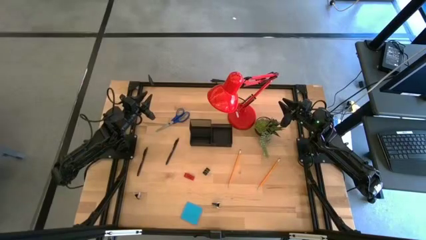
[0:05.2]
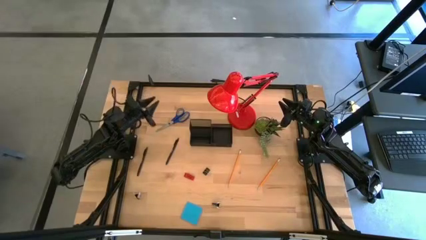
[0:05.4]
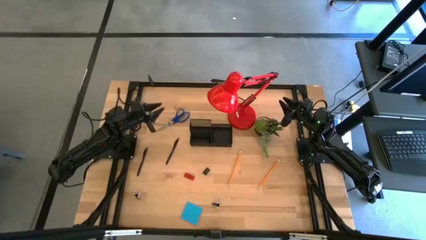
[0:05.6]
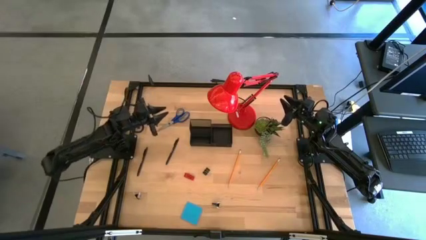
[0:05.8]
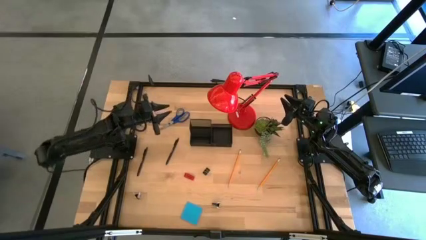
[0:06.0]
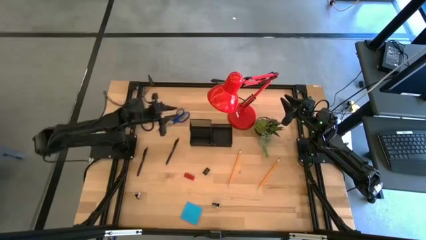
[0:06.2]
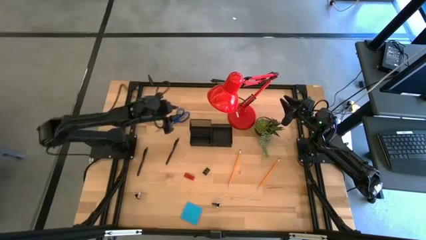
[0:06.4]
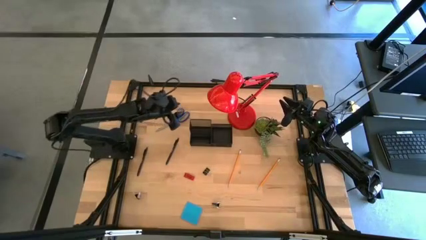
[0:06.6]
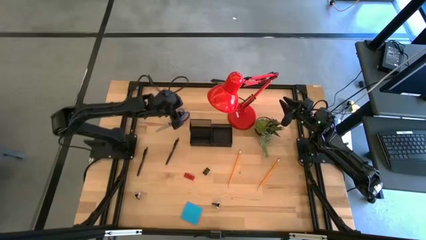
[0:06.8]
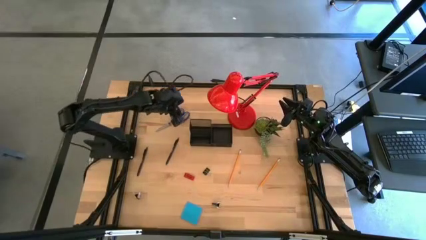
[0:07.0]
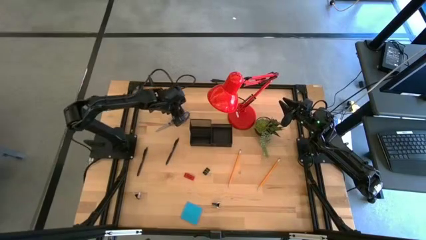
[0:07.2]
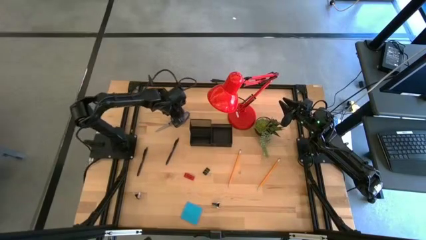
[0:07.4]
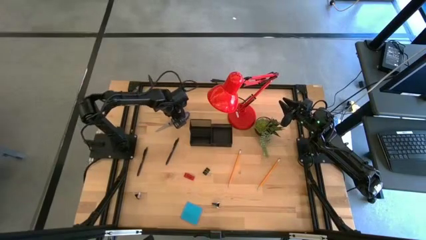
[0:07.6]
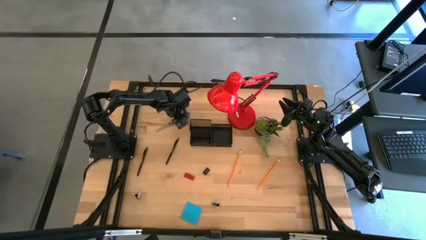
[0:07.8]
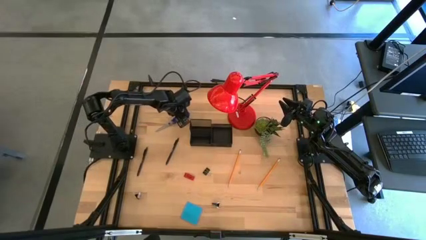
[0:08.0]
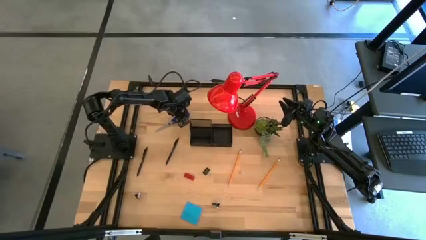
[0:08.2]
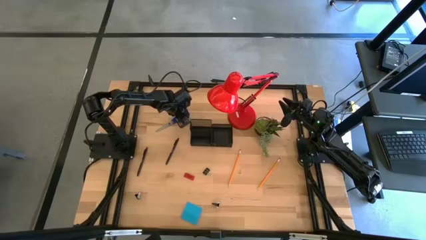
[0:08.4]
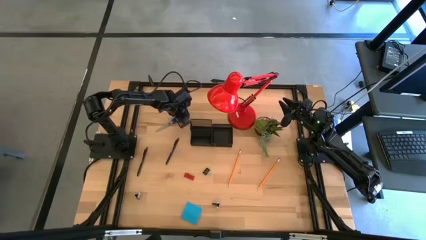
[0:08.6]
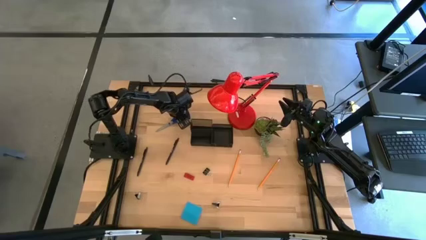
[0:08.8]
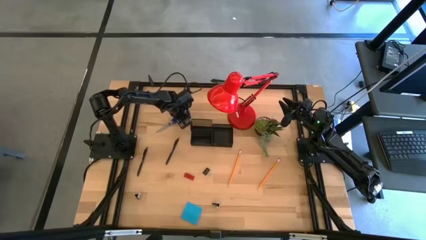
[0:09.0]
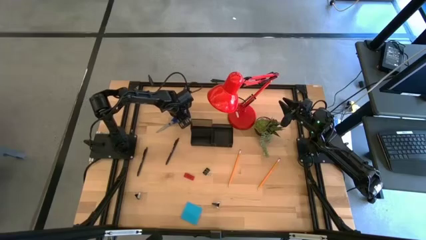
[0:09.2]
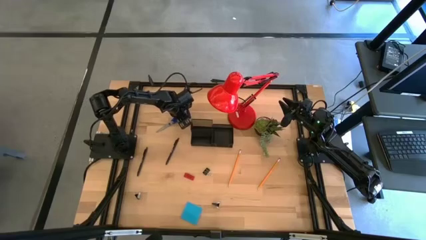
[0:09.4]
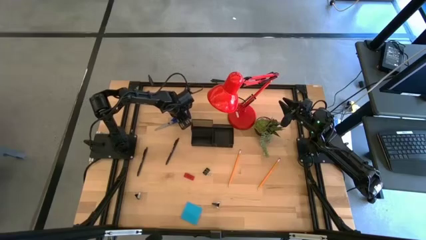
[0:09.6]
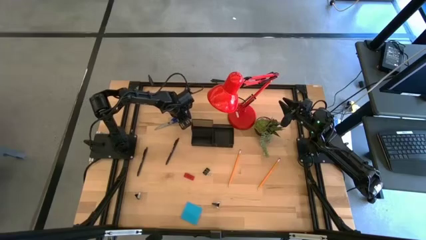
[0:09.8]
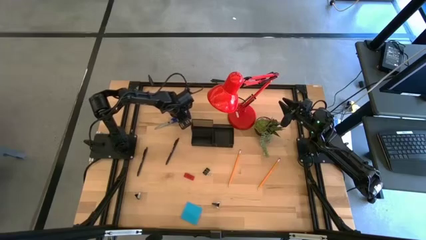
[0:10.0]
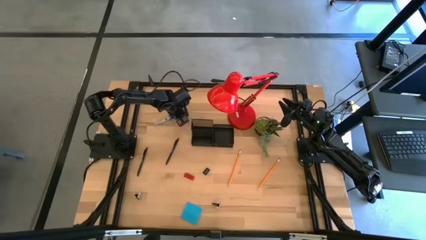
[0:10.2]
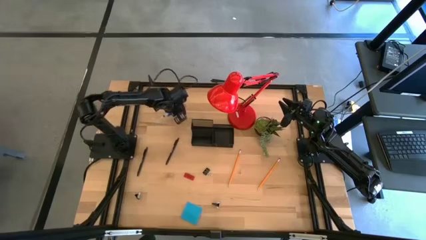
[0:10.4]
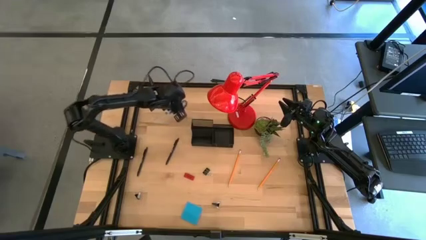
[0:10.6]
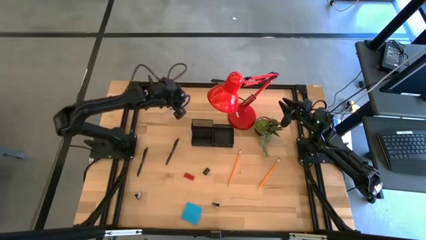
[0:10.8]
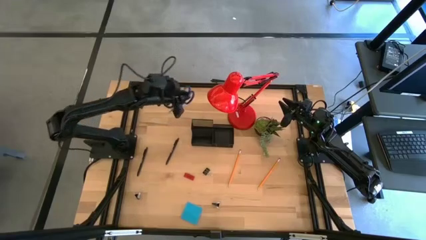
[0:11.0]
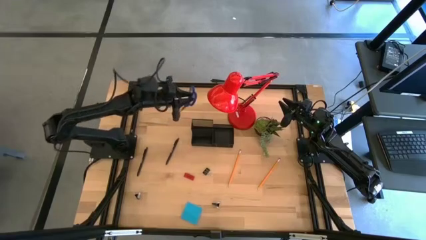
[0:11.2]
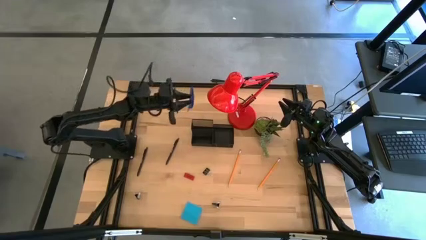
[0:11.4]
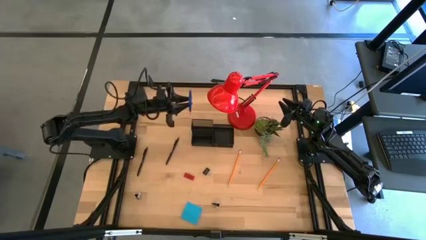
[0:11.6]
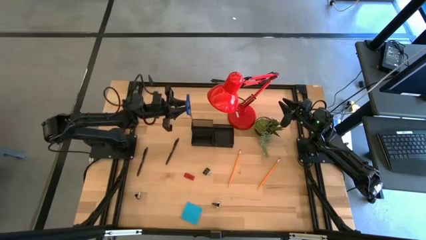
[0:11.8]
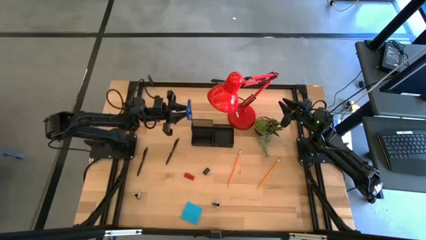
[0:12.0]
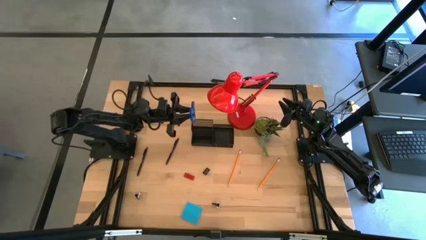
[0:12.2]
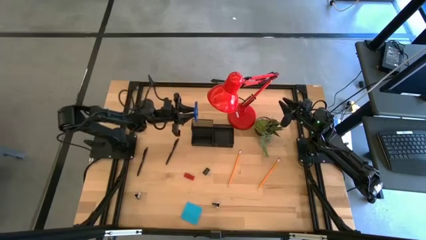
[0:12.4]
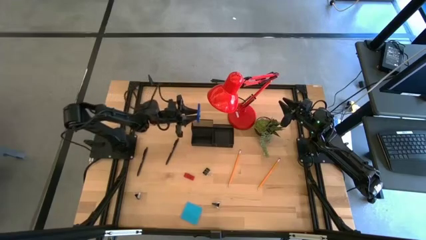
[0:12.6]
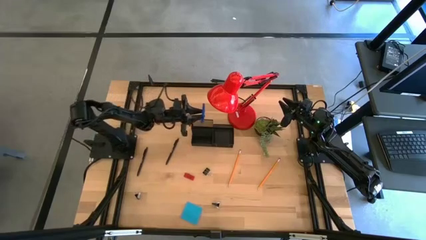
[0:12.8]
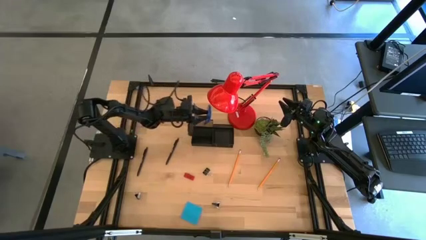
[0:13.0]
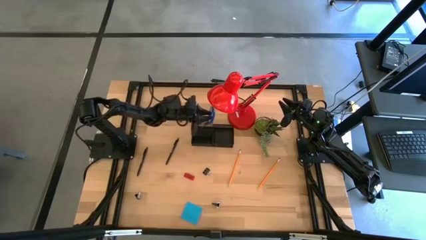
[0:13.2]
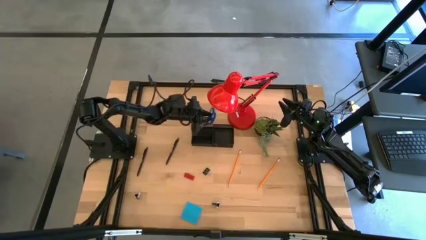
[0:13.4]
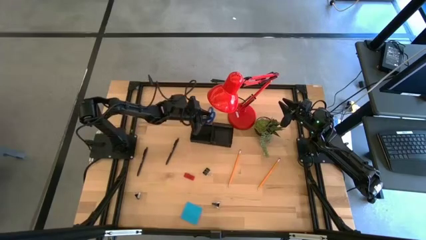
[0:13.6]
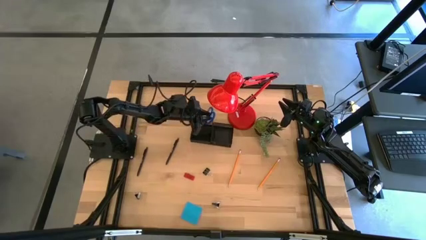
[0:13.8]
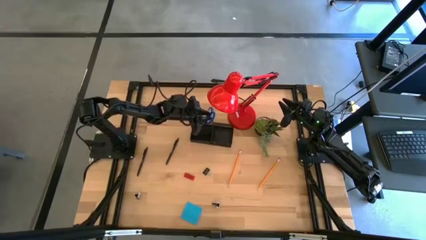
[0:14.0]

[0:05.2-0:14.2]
Task: Pick and place office supplies into organizer
Put the blue scissors into the black desk organizer

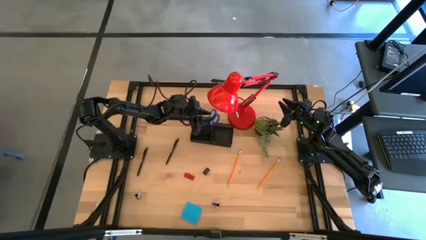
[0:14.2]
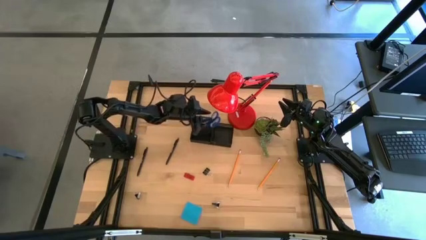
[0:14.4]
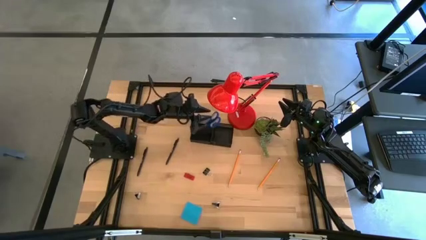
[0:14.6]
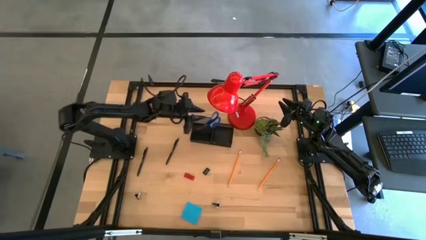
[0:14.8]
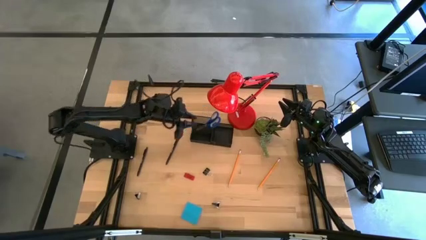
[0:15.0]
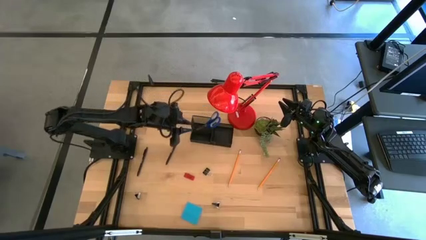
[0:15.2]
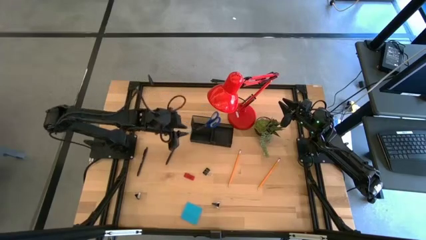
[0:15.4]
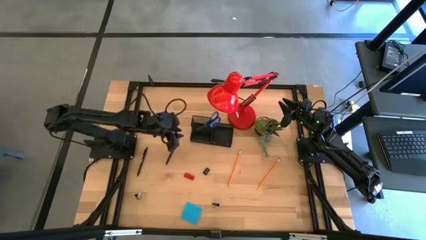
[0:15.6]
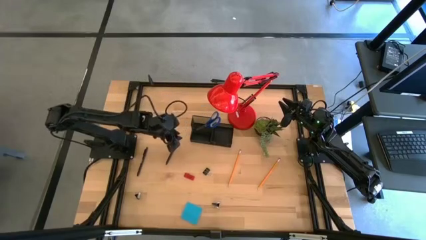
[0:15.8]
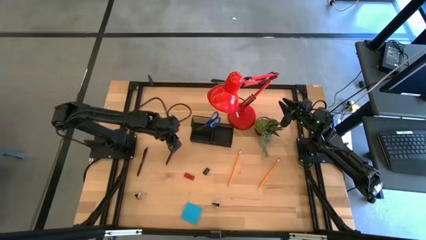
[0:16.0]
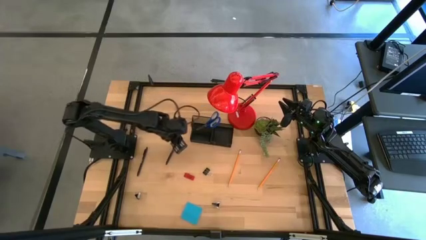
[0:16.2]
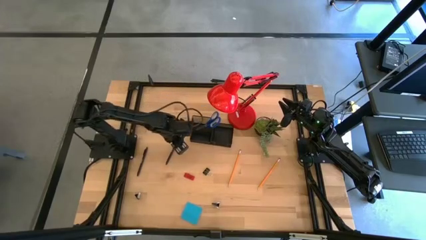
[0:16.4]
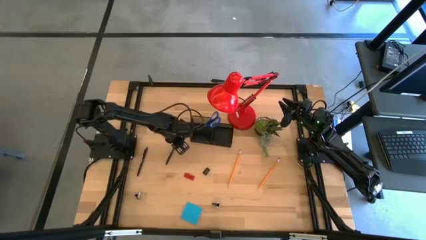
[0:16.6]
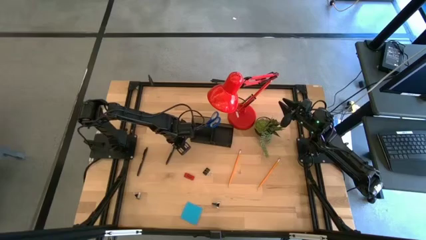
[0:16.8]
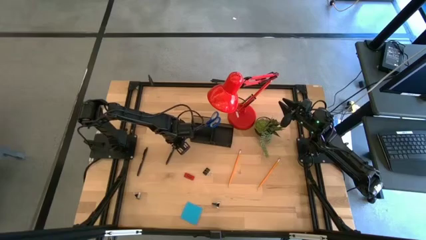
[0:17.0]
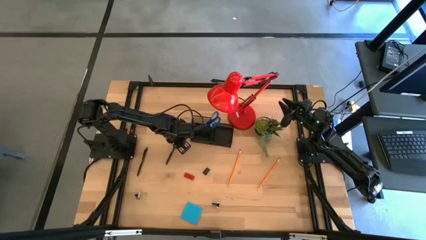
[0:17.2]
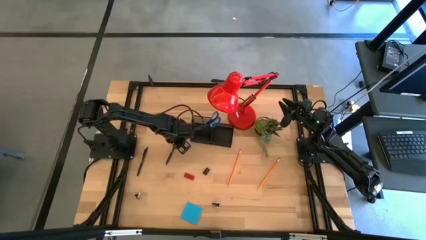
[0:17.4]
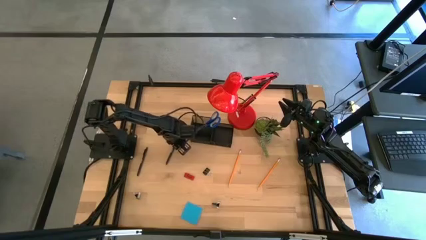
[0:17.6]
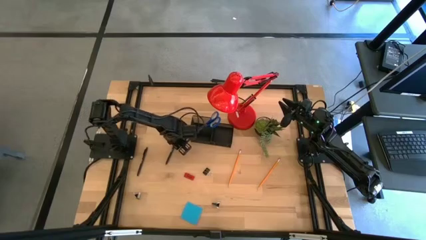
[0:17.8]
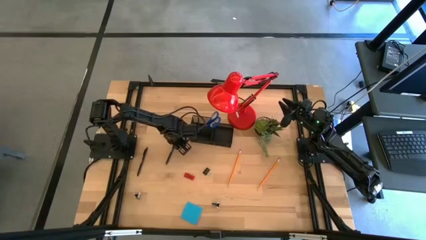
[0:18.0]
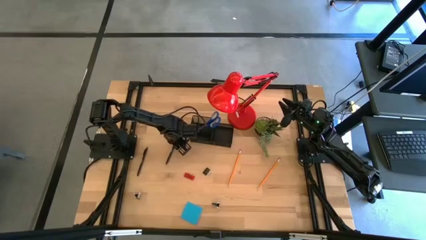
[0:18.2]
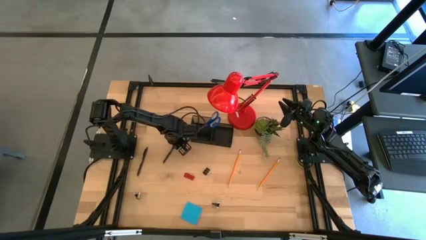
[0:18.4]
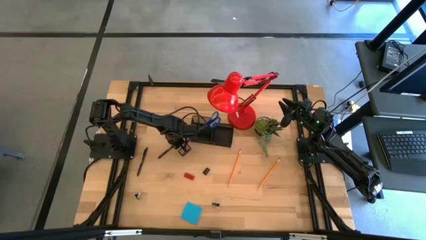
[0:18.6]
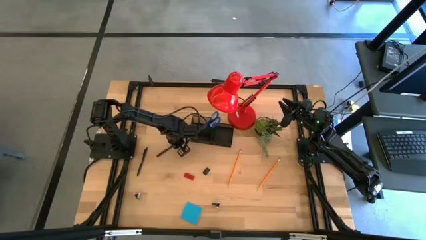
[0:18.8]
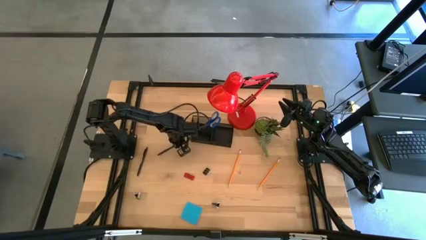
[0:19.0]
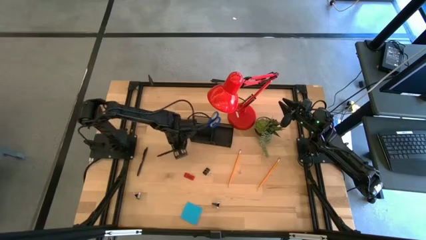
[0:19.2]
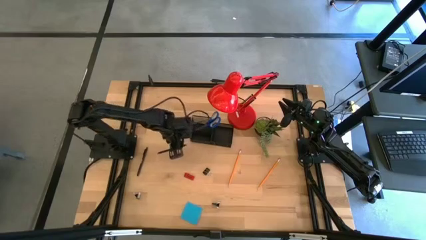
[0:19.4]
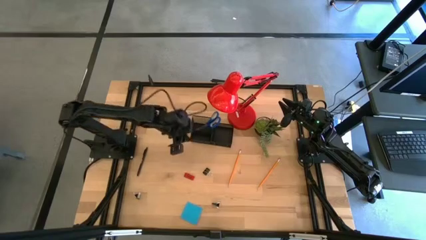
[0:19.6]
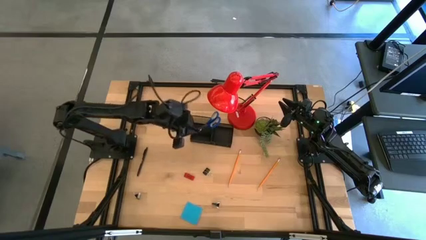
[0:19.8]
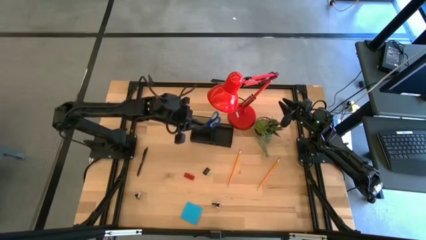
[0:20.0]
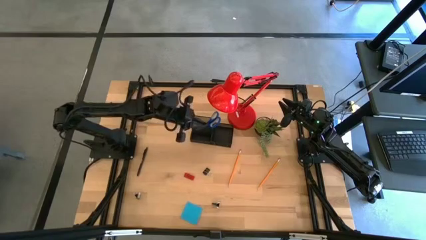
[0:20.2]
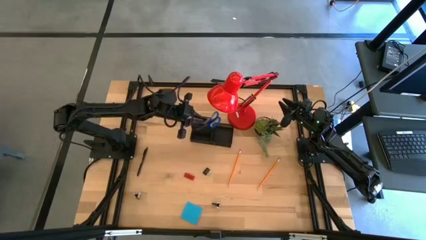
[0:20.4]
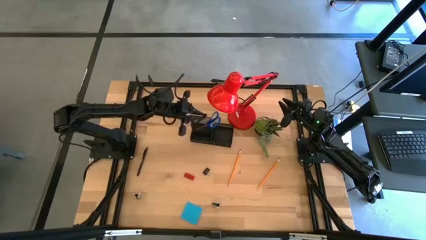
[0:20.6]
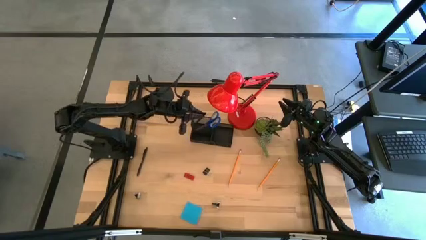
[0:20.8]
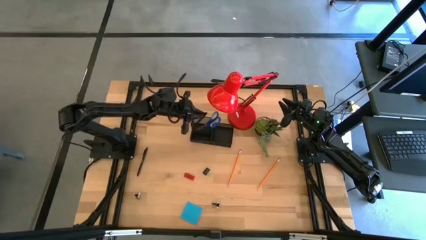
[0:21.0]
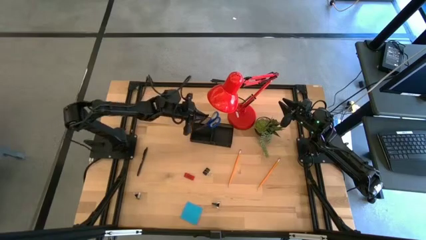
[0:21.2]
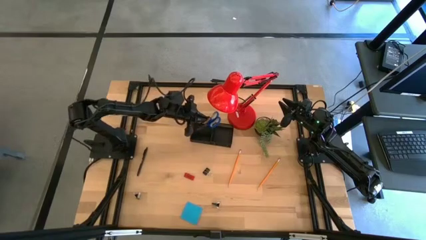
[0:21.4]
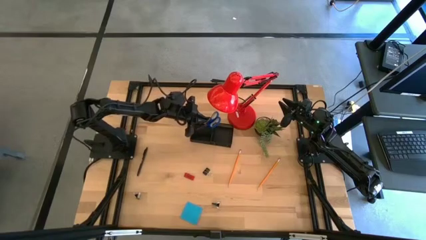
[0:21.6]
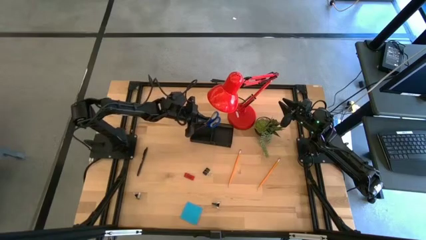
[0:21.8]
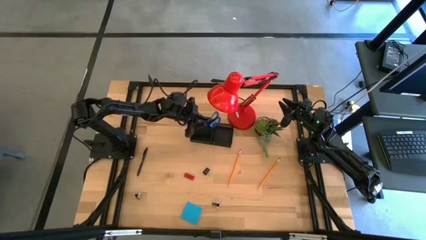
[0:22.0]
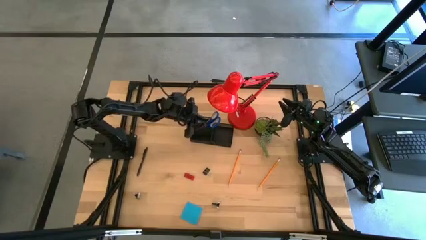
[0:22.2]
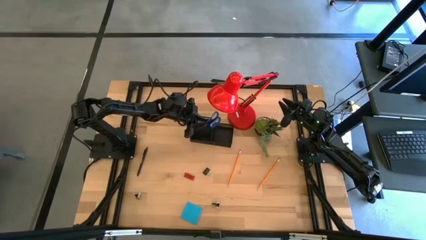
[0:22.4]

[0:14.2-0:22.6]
Put the right black pen into the black desk organizer
